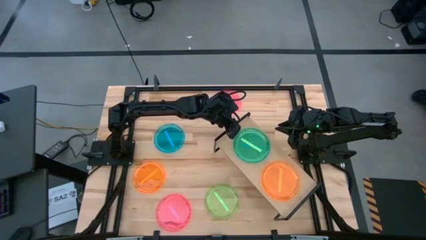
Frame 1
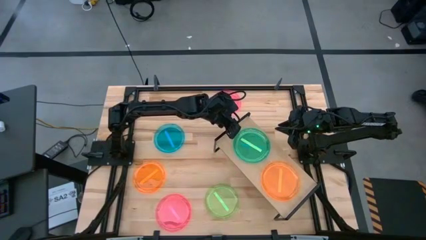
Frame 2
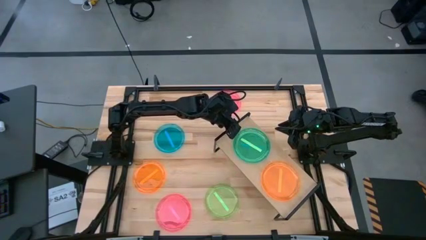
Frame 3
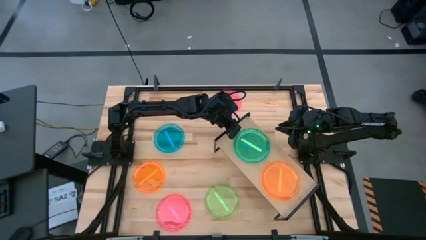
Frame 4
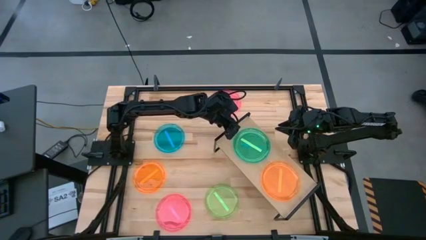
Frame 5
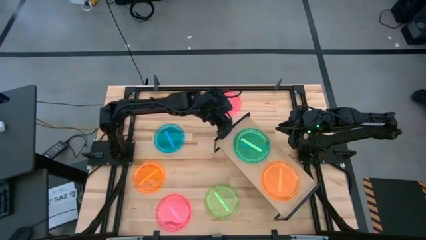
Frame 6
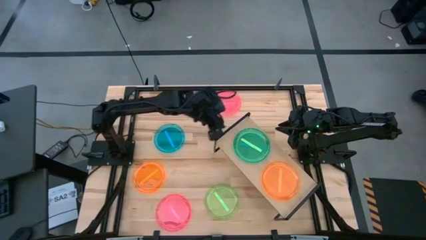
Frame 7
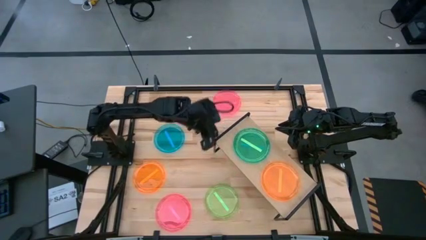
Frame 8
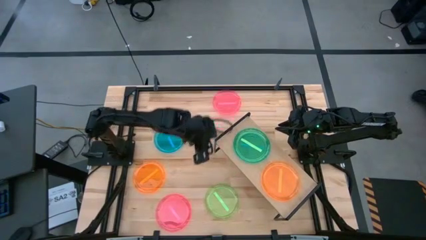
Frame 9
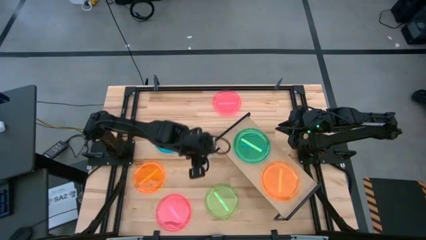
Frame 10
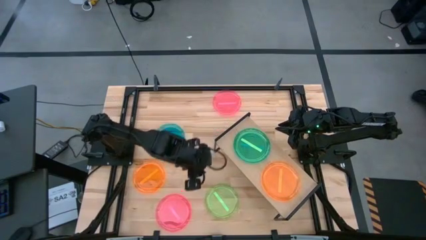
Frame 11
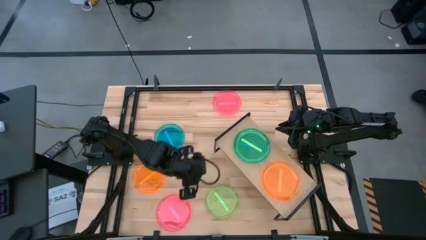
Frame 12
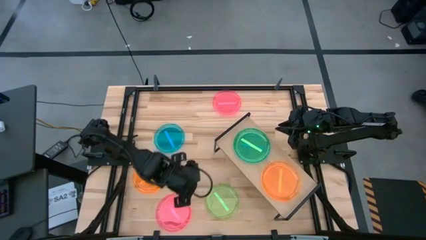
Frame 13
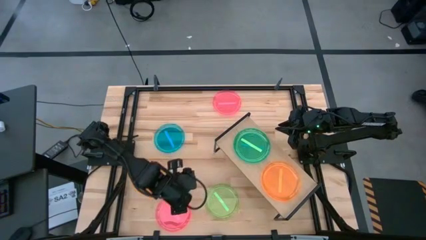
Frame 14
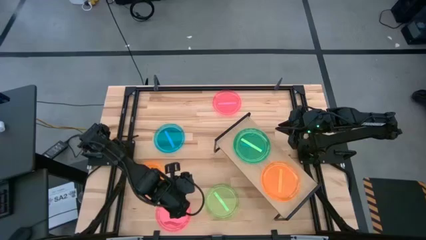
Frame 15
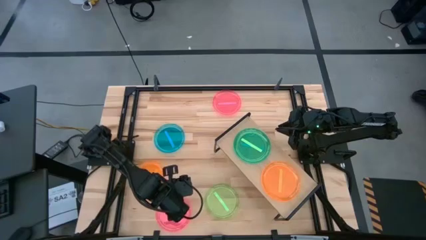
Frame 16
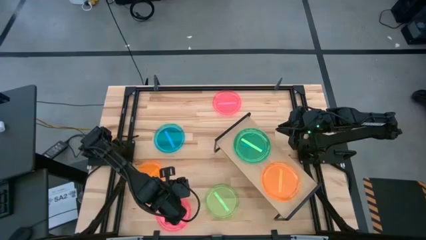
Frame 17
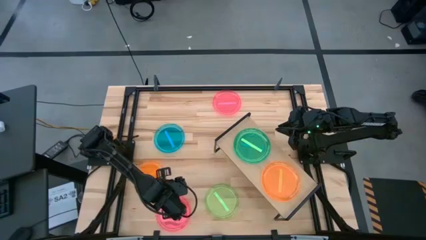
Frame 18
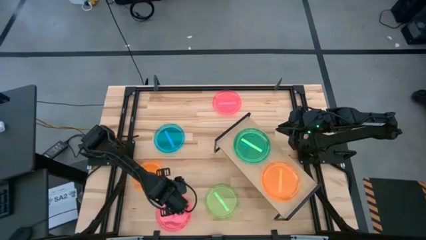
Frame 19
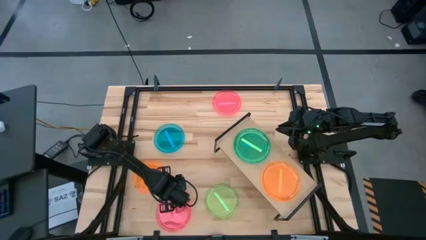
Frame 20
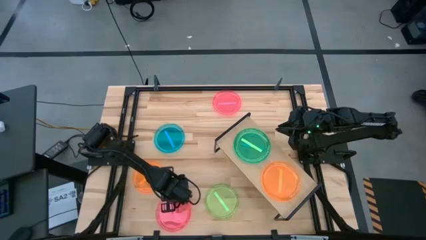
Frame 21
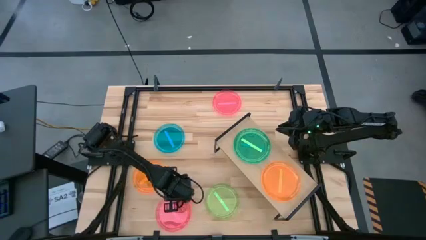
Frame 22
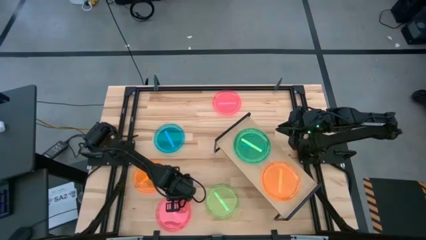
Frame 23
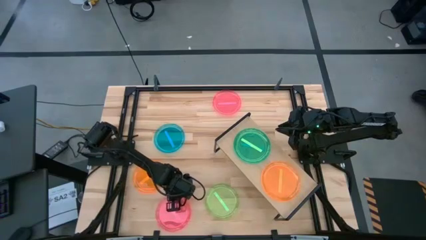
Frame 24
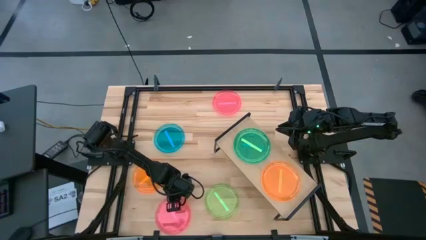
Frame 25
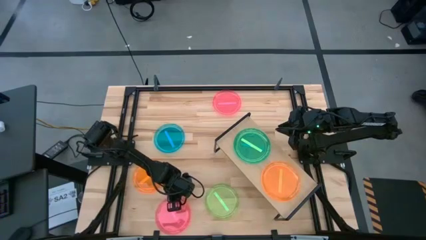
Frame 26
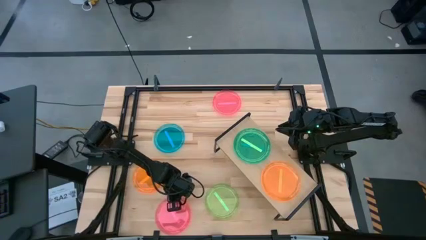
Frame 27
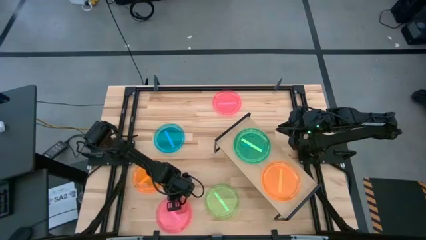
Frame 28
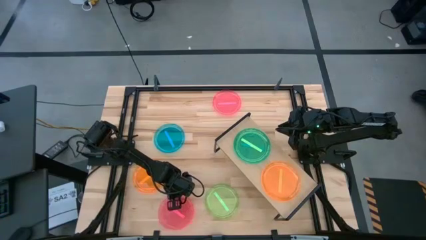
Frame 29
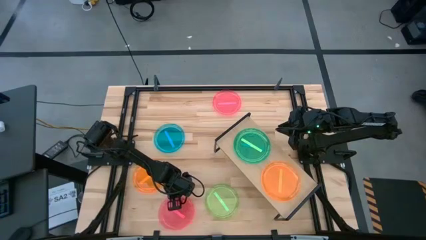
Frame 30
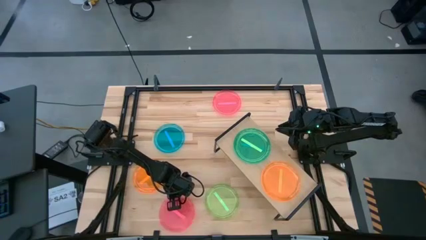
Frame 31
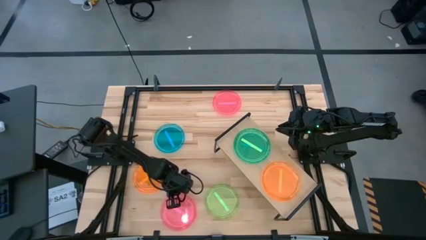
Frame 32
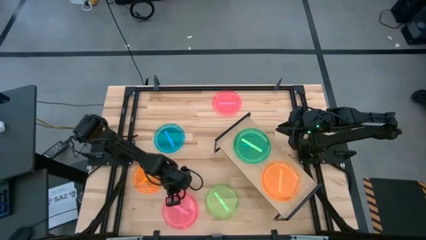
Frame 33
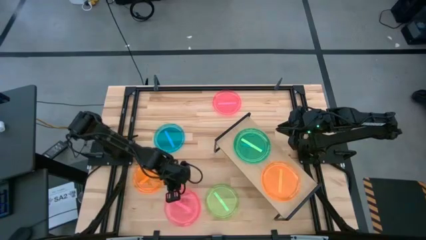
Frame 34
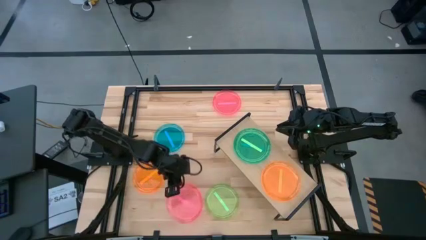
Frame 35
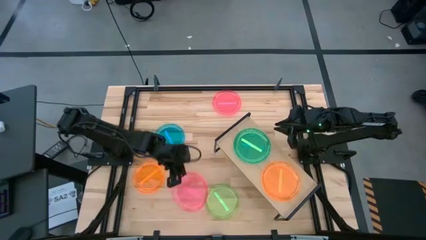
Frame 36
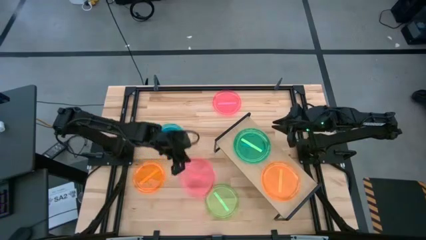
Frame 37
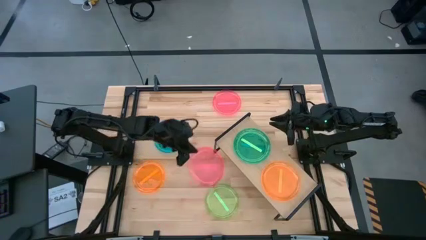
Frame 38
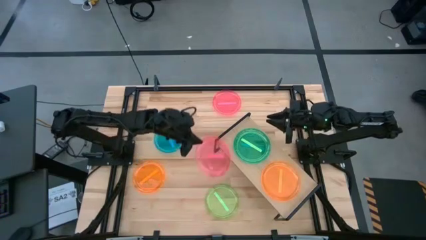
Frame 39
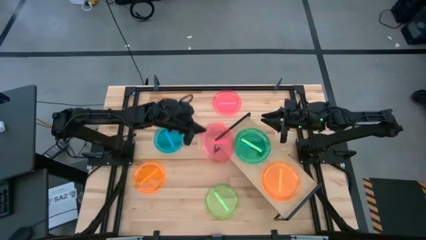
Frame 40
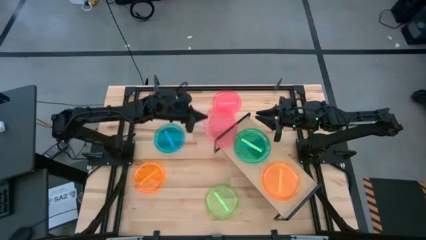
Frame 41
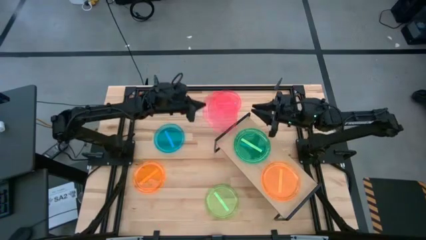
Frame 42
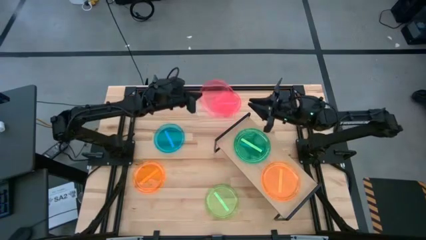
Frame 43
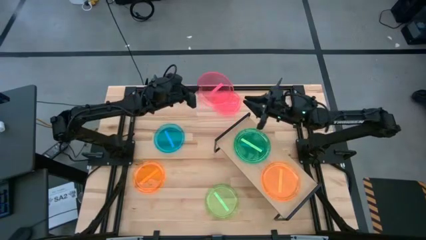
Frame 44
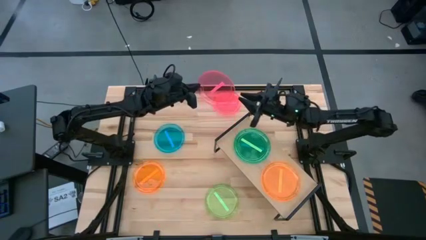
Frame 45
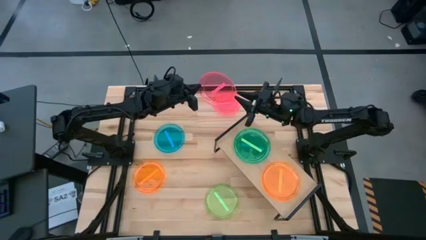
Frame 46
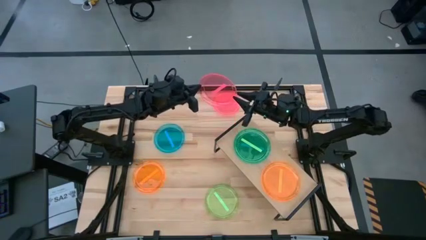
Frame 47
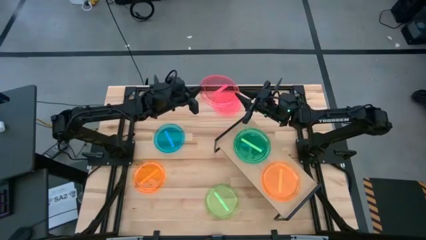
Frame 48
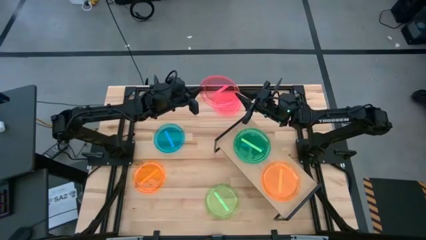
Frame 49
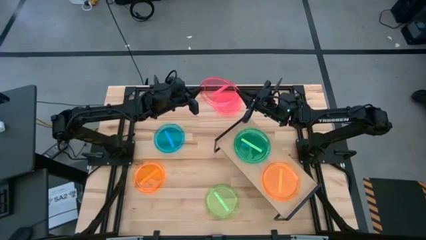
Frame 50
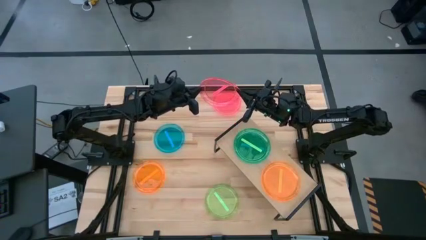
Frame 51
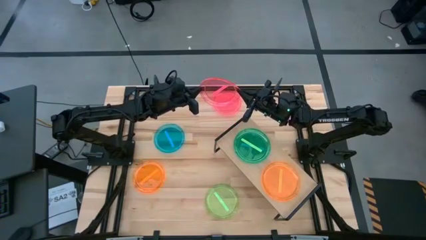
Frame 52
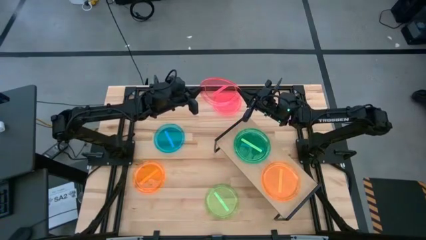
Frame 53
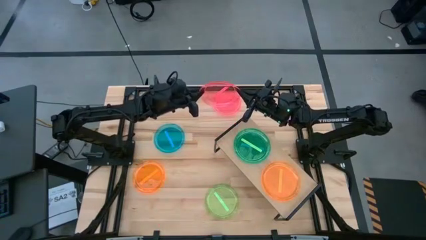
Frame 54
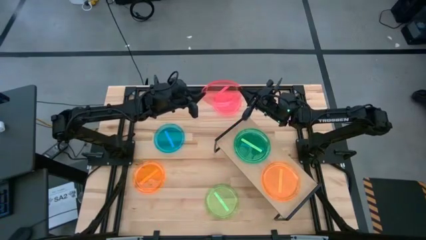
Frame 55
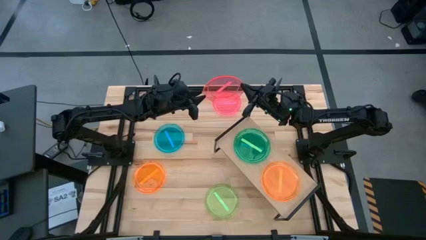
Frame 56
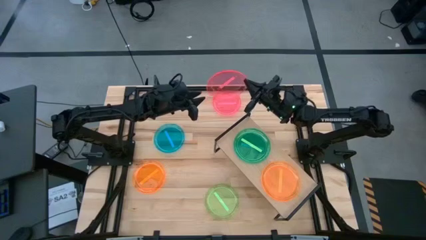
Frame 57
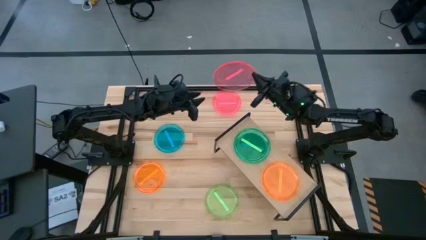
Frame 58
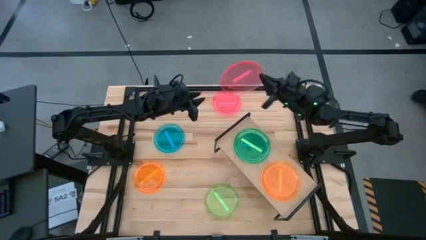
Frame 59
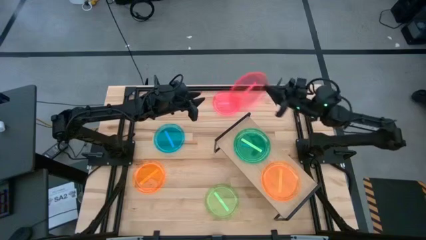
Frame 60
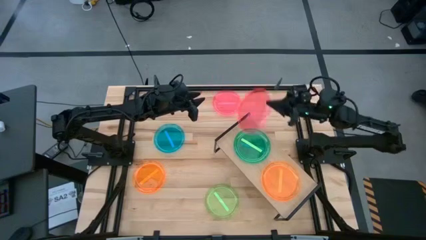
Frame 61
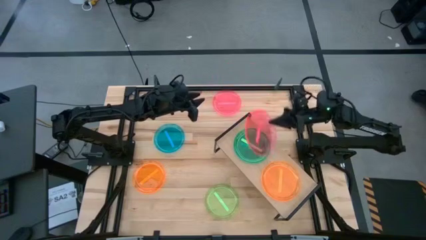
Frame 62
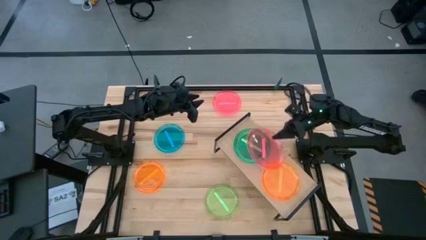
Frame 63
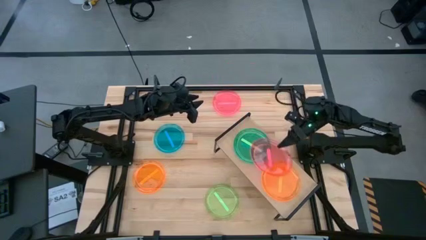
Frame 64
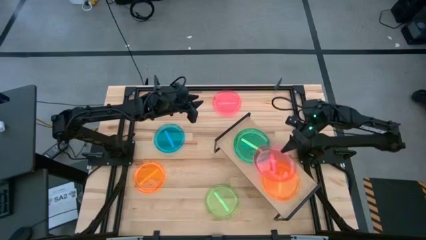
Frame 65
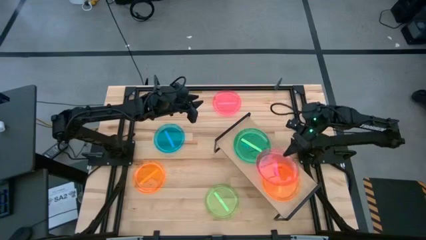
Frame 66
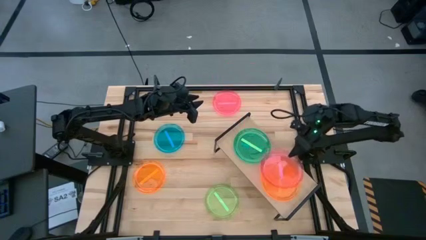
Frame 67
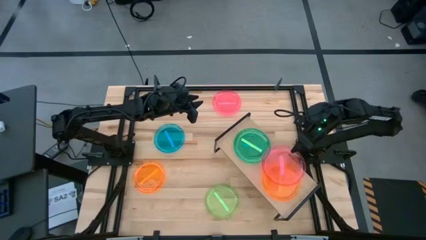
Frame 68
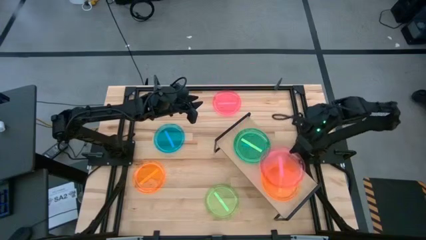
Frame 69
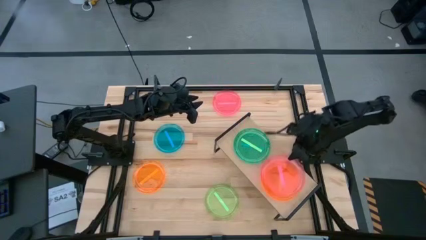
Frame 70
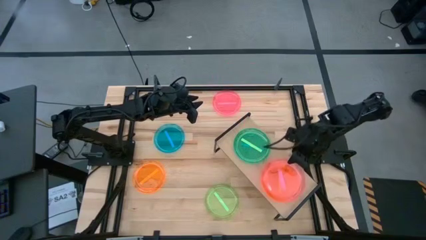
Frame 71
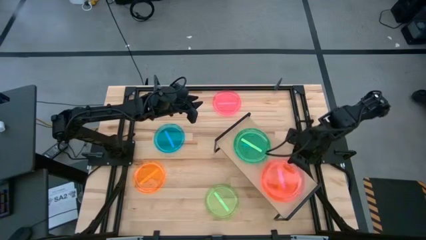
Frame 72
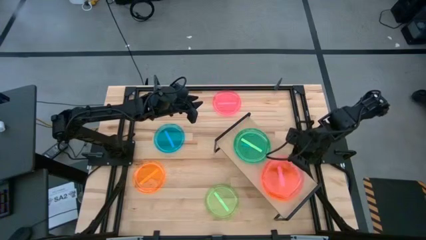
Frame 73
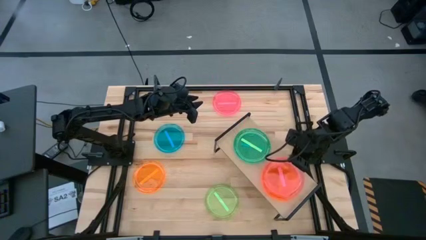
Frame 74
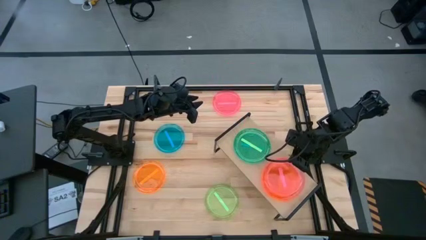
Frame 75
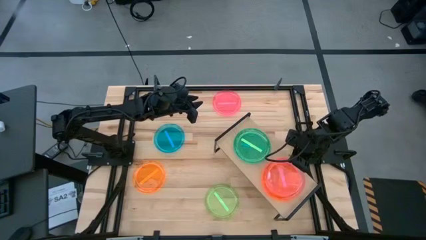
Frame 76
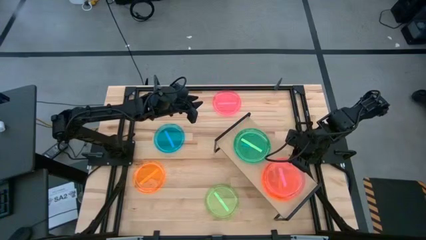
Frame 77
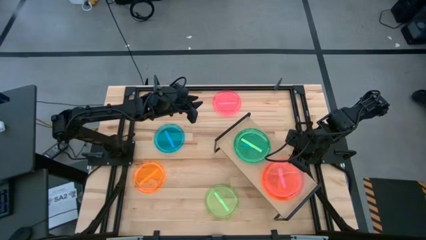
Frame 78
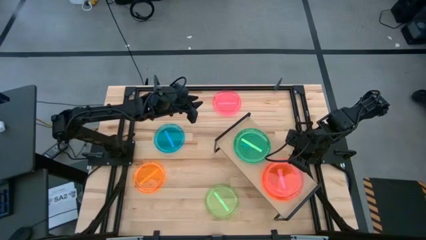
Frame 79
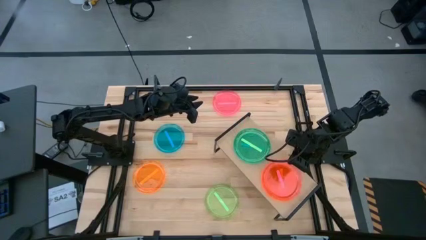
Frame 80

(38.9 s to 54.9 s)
Task: Place and stack plates onto a shelf
Stack the bottom pink plate on top of the orange plate on the shelf

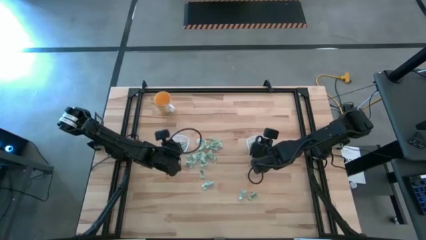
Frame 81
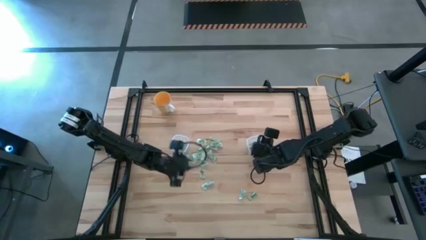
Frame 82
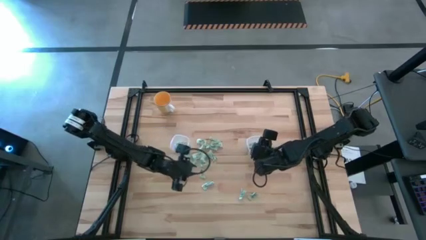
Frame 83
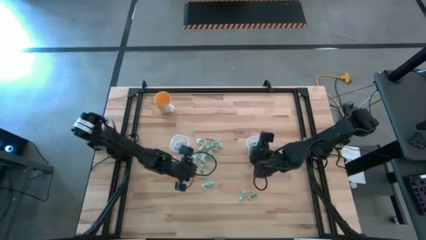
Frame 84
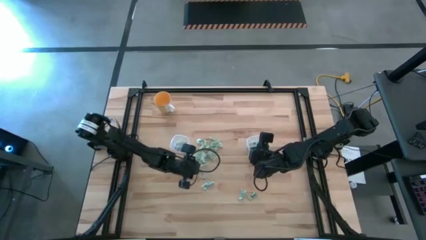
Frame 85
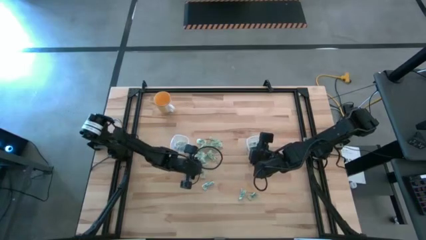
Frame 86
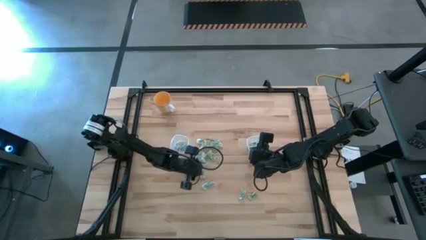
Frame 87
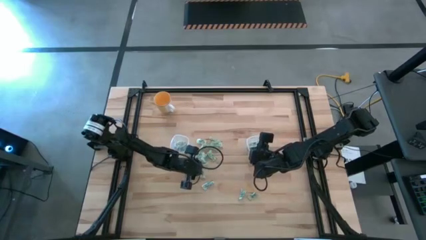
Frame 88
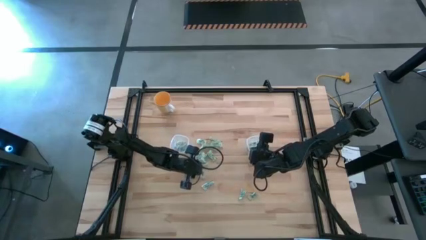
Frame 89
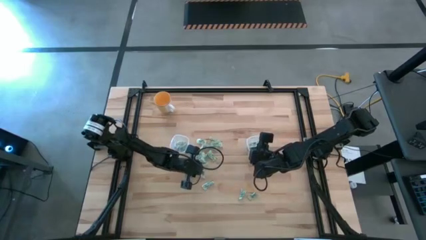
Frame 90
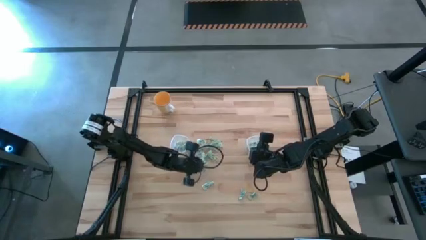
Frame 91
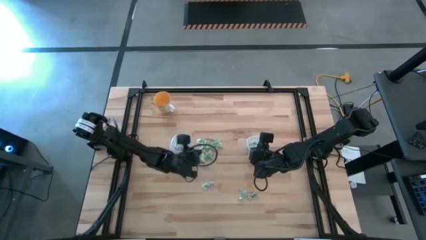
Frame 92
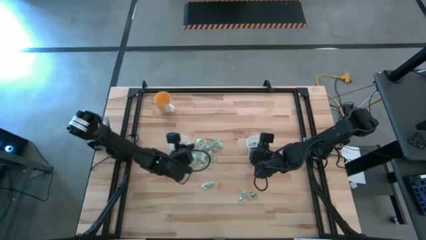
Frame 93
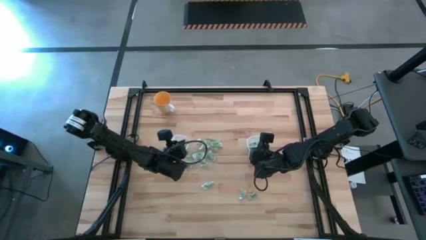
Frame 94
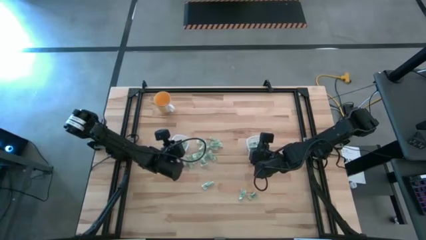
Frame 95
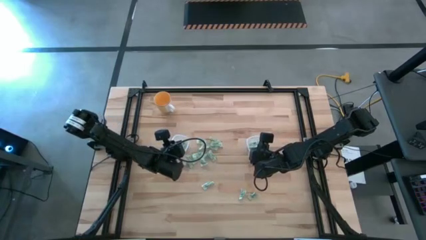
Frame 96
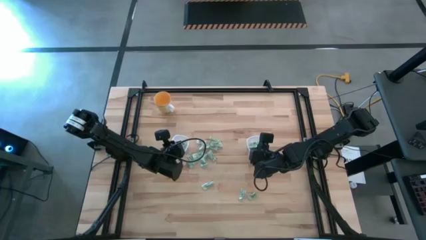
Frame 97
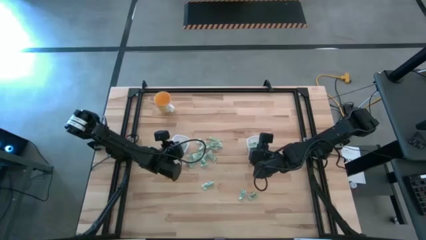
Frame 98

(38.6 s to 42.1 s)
Task: Pick and place Stevia / Truvia into bins
Put the stevia packet into the left transparent container
